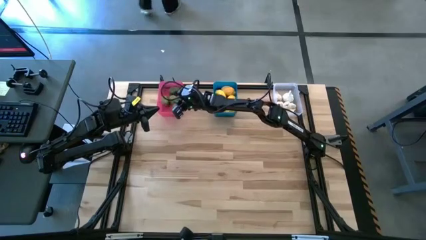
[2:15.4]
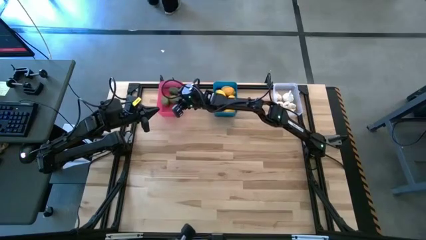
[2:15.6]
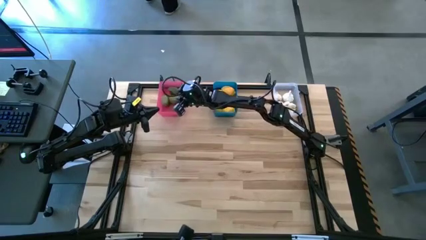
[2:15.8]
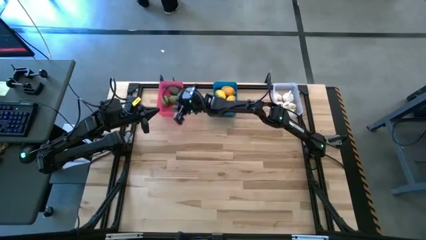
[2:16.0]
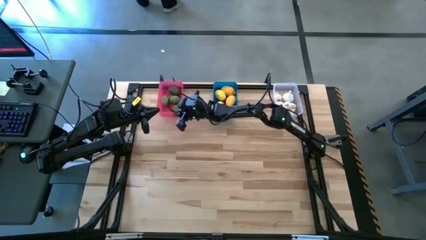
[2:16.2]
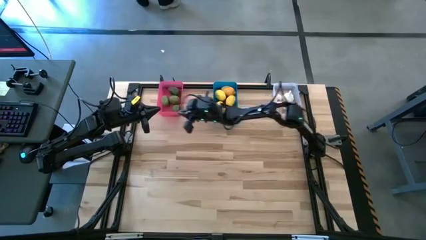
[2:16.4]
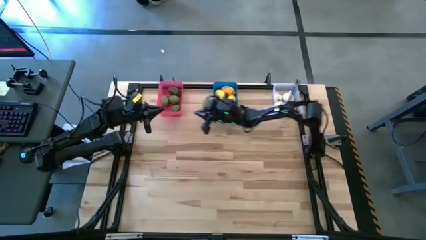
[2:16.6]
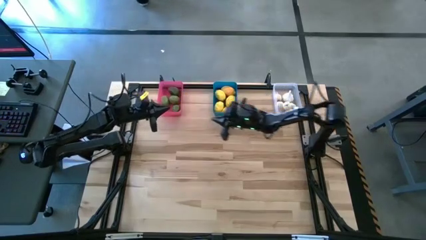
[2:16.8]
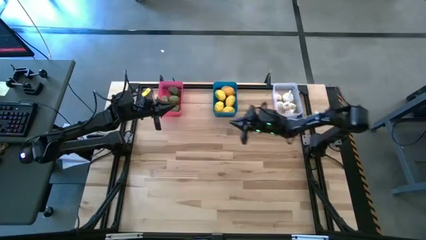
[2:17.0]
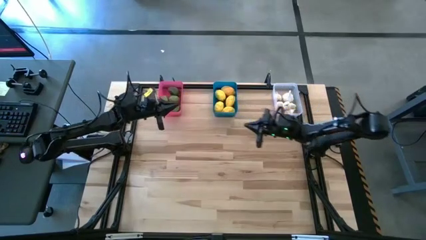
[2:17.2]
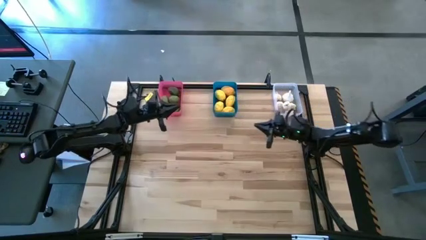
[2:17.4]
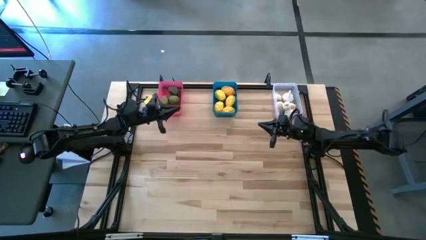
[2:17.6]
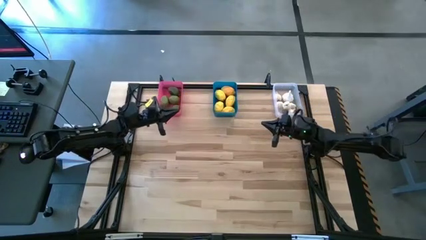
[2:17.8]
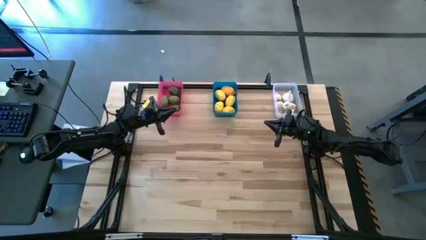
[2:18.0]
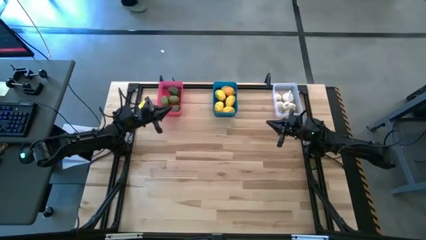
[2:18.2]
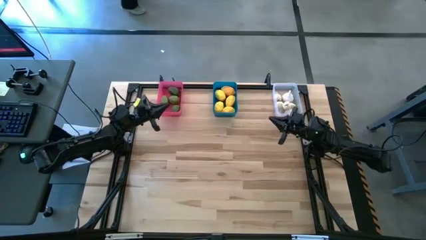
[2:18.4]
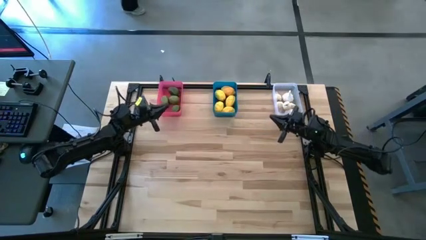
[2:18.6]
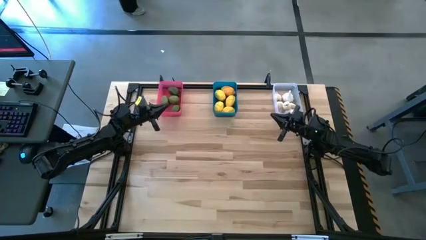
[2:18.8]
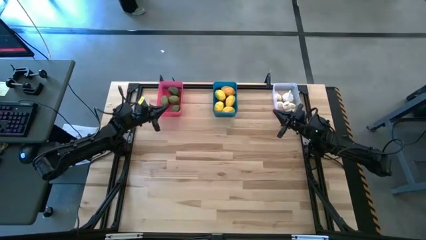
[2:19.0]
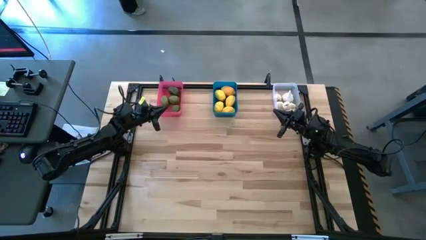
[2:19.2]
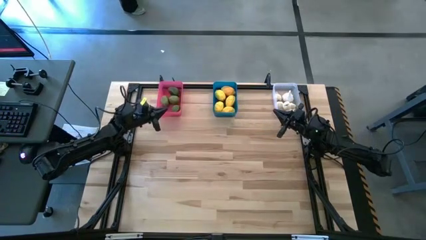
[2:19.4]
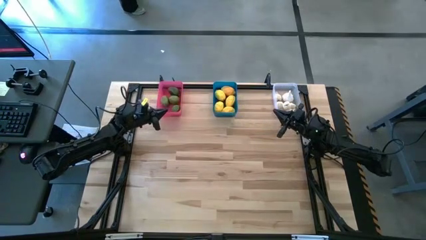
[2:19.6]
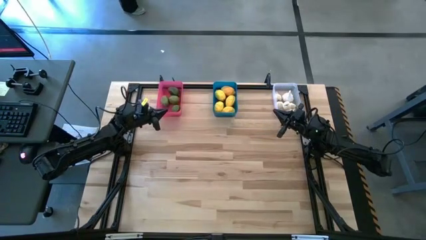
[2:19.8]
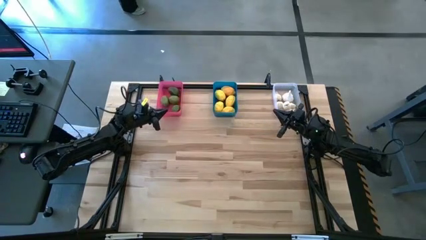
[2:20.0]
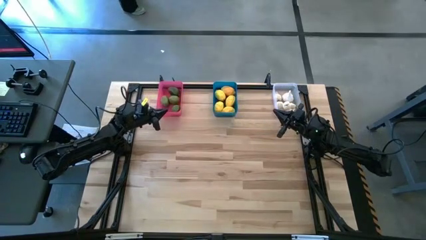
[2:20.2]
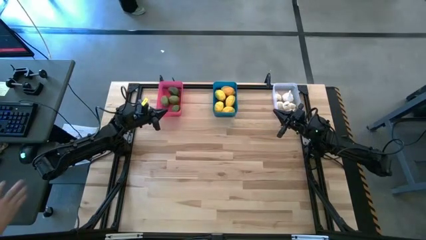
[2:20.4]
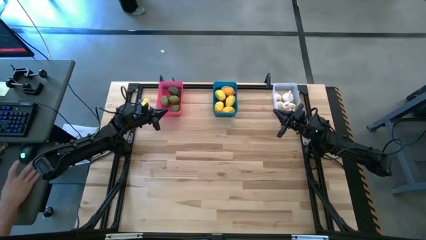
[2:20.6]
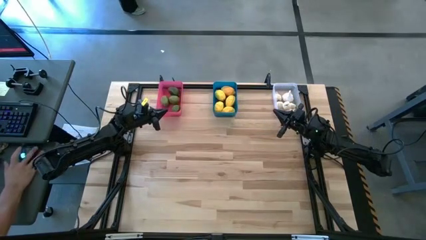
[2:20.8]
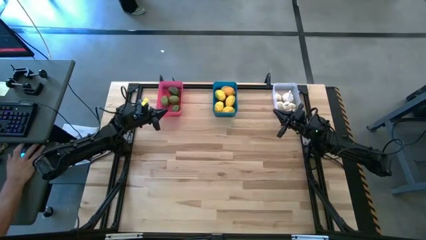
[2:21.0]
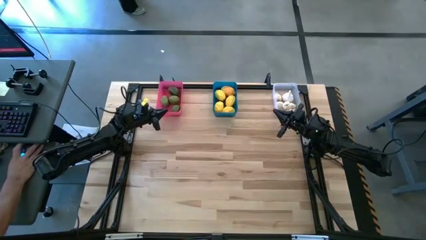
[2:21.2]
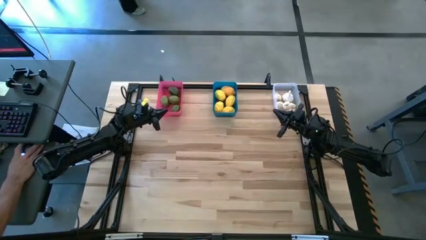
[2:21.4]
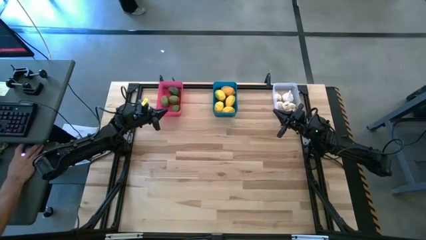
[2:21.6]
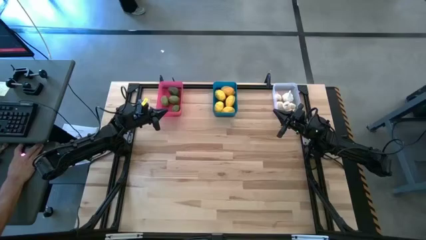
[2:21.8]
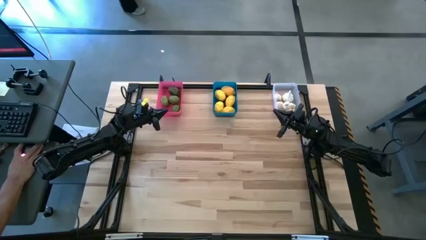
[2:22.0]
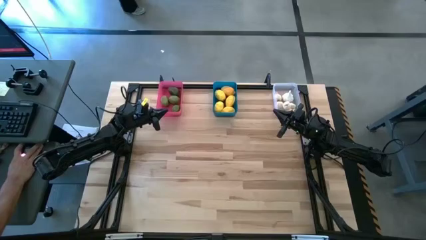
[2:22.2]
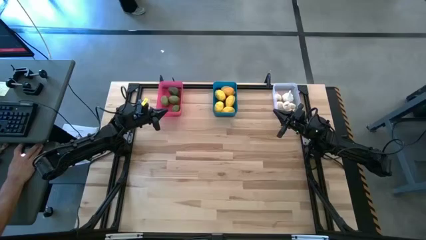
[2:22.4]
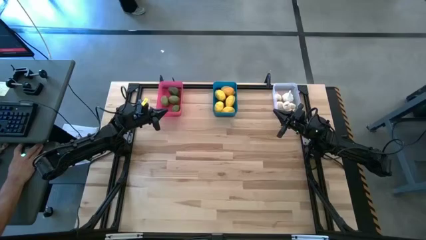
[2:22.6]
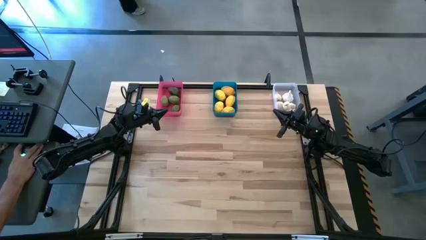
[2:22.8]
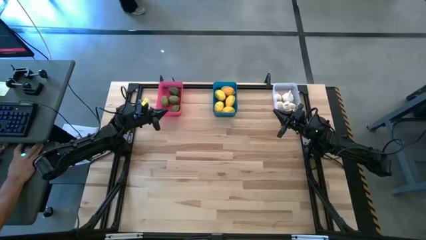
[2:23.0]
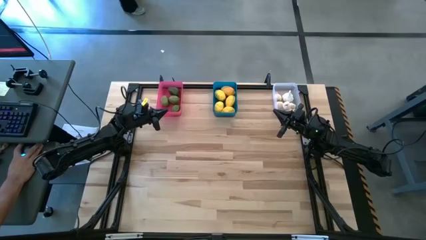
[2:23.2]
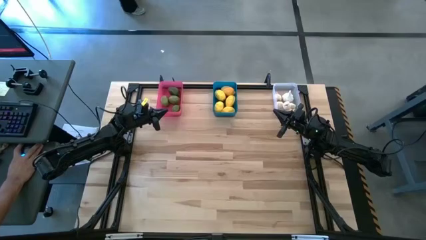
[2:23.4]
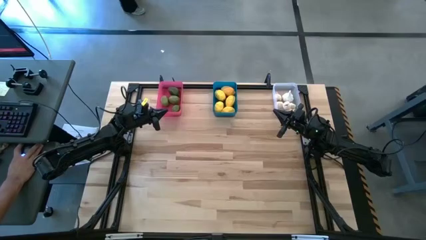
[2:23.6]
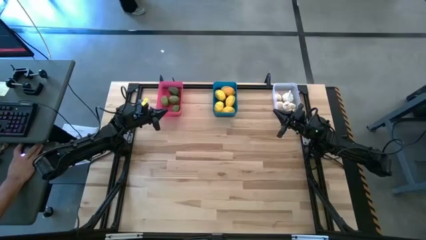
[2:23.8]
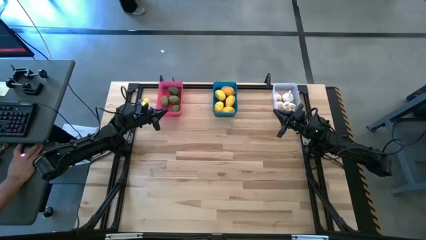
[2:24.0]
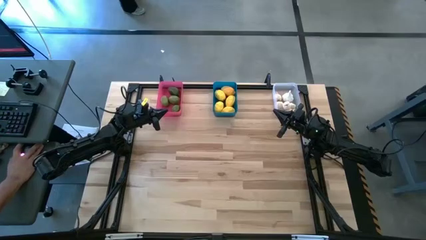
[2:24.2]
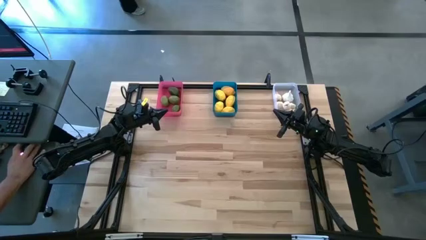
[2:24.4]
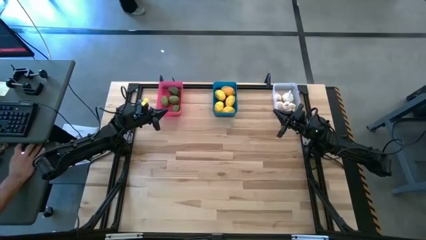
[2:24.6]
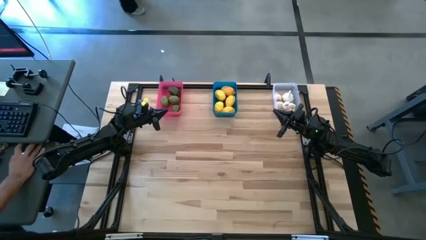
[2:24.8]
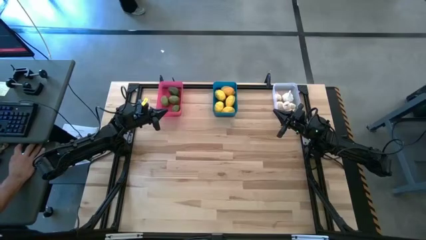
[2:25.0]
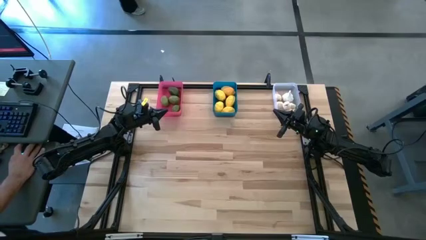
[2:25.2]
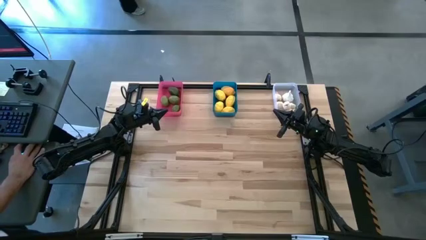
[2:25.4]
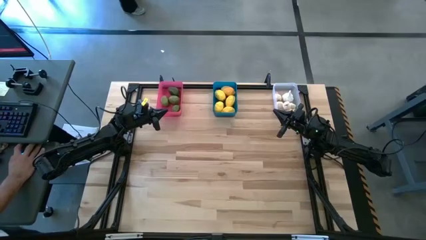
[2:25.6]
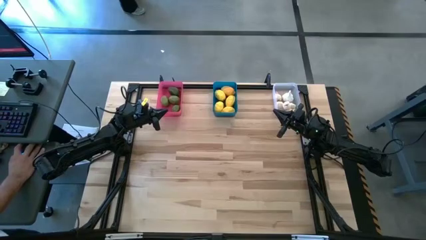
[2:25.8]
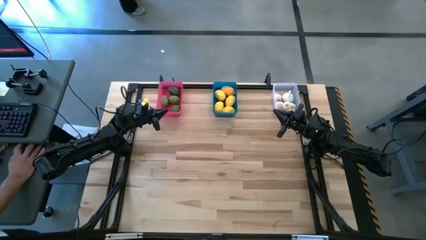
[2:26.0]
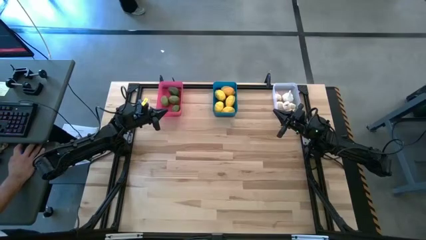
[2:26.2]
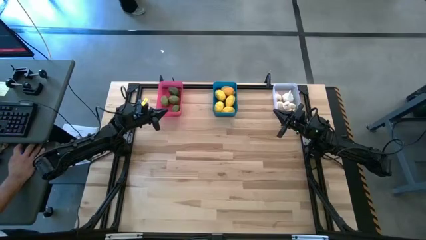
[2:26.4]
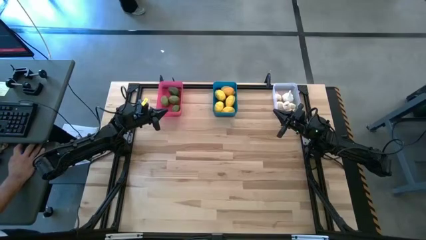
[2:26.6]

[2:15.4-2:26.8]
Task: Sort produce into baskets
Return to Home Position

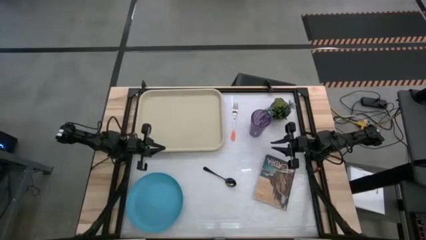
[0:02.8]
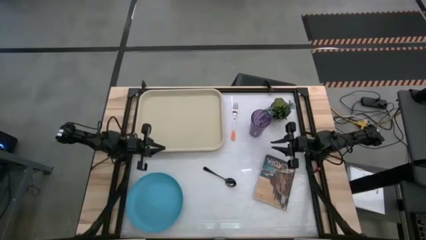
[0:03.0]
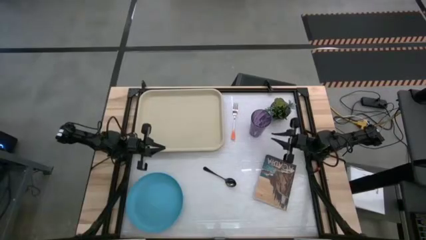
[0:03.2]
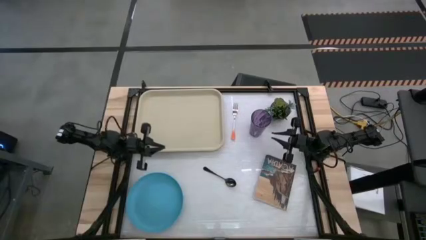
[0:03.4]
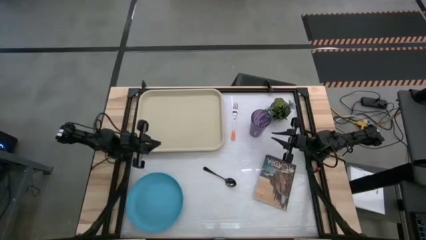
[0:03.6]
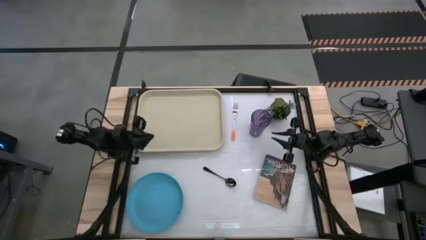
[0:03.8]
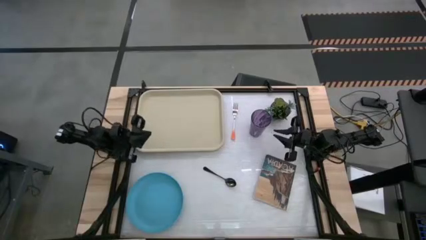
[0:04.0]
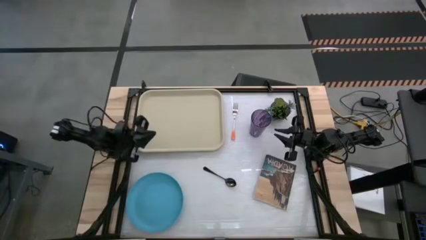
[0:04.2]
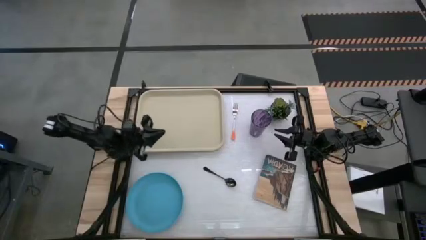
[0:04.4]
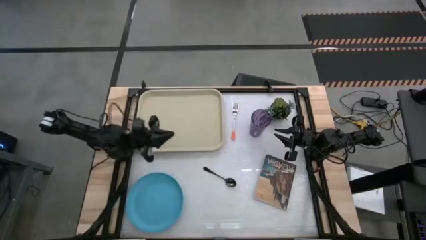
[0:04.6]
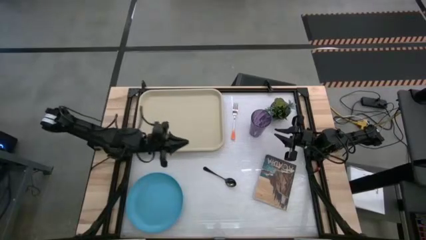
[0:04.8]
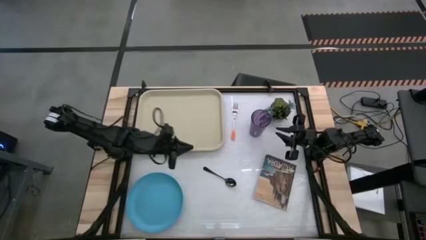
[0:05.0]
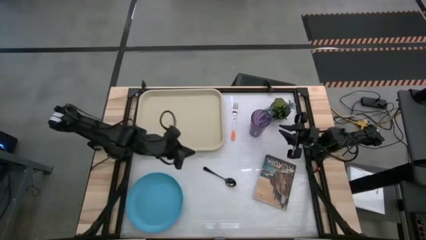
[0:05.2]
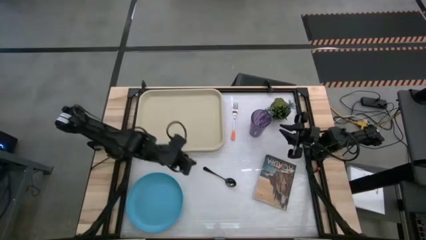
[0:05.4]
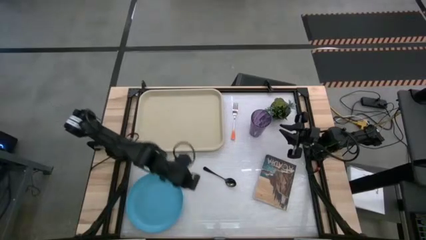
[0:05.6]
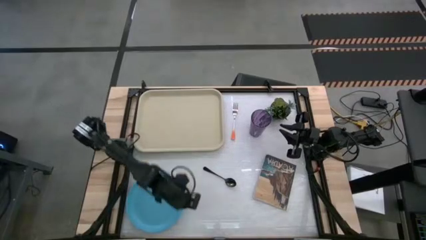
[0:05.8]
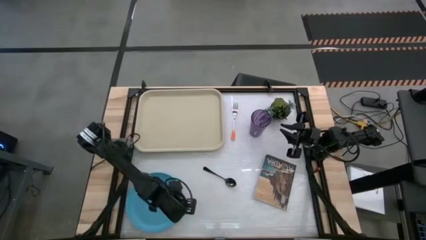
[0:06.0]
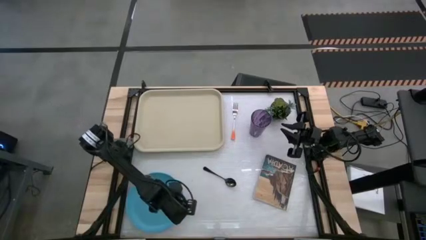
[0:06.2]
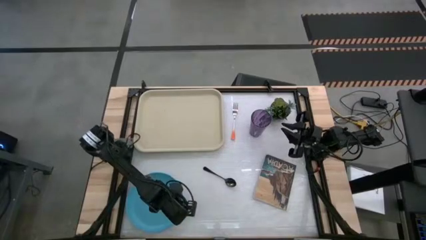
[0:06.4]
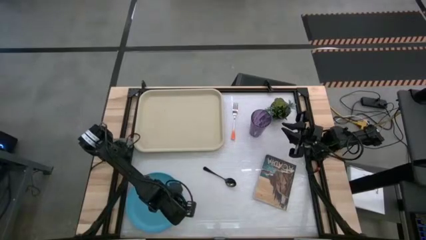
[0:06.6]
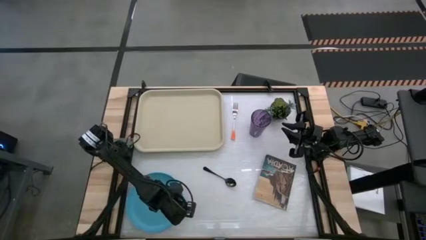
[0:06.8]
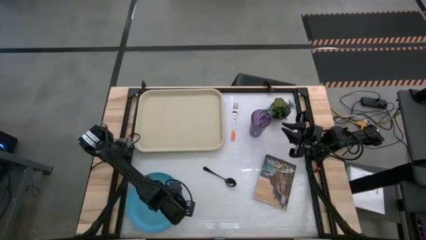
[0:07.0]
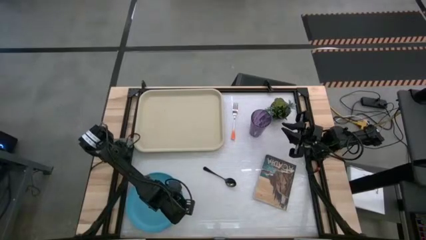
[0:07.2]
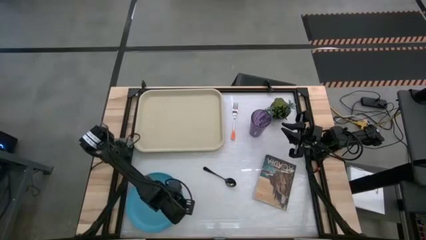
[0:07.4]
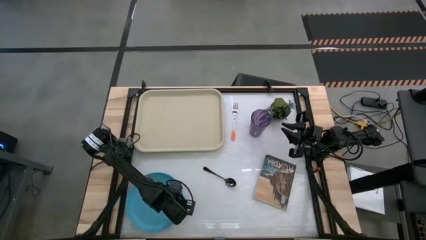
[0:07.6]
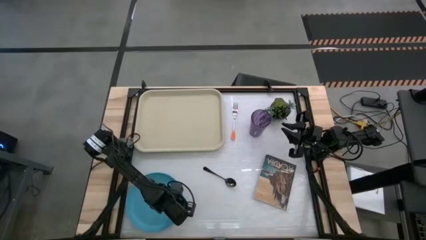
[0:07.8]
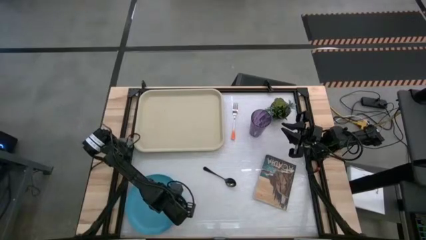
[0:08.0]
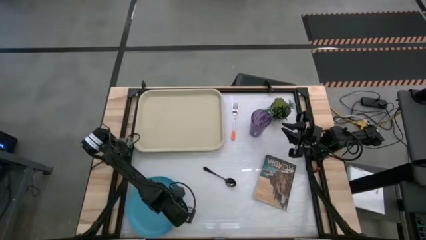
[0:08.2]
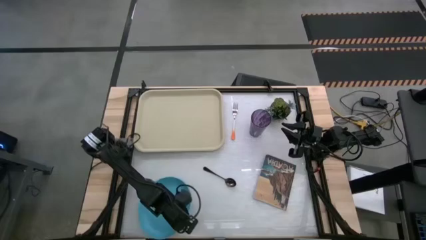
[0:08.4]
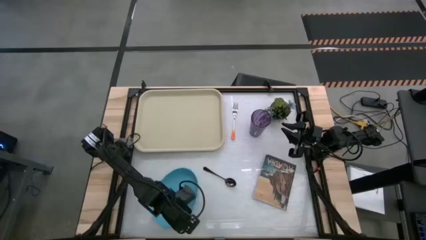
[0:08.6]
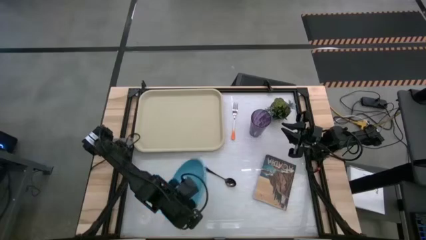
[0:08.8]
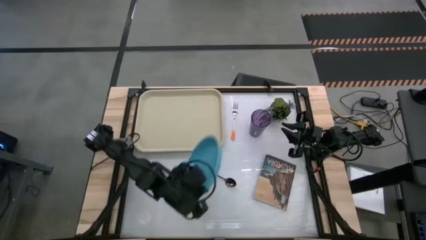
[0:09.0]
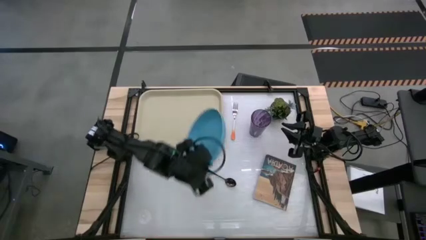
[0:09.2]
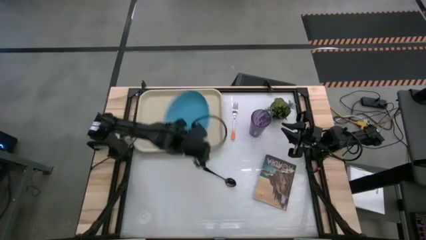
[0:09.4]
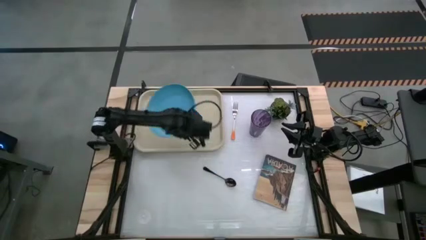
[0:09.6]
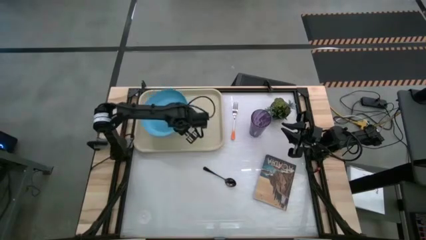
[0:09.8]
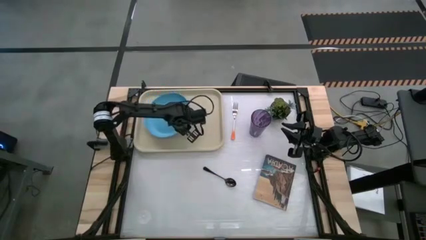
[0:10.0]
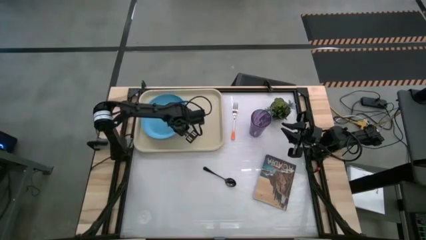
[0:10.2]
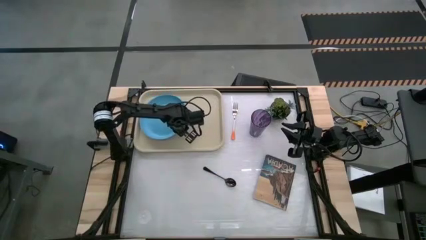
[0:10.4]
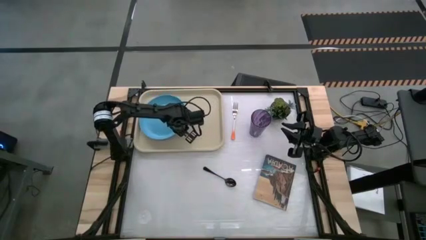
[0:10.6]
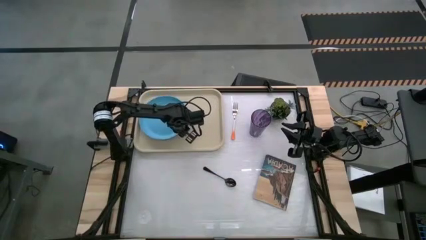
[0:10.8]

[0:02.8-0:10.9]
Task: Pick and place plate/cup/fork/spoon on tray
Put the blue plate on the brown tray
